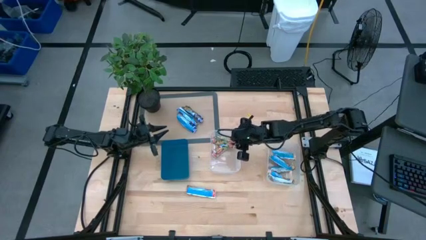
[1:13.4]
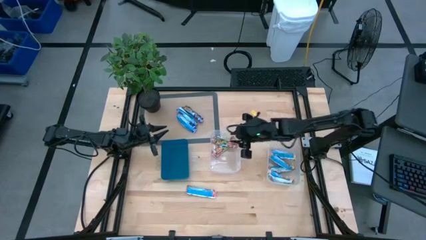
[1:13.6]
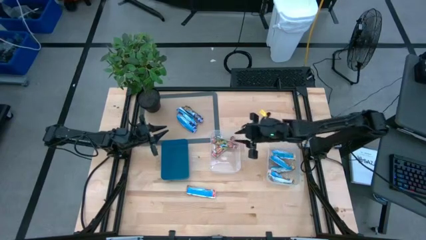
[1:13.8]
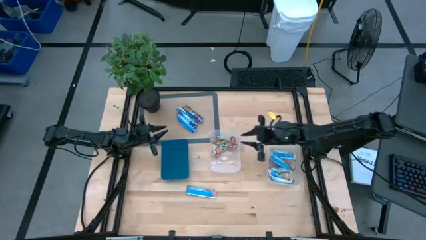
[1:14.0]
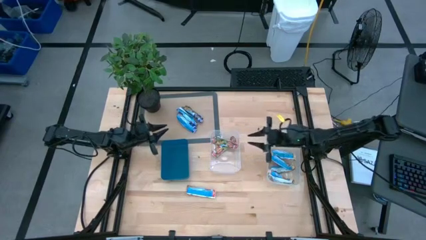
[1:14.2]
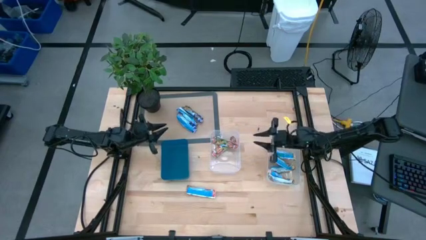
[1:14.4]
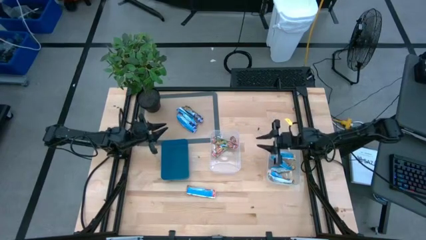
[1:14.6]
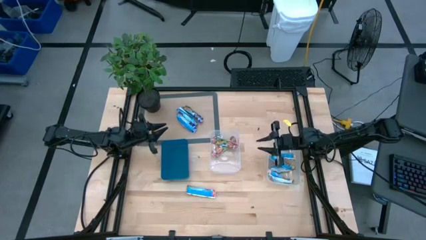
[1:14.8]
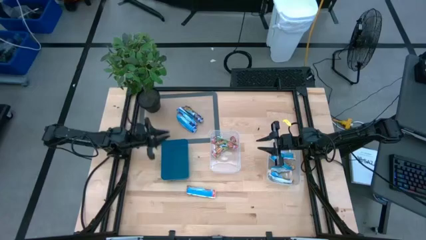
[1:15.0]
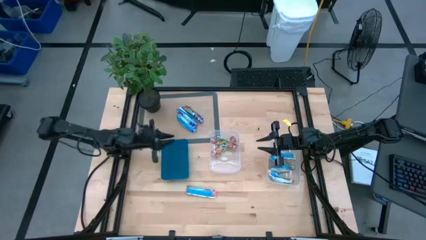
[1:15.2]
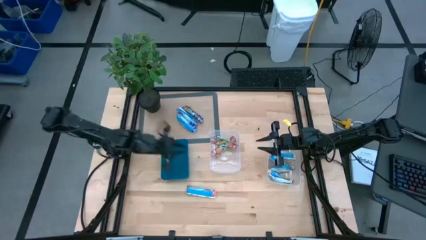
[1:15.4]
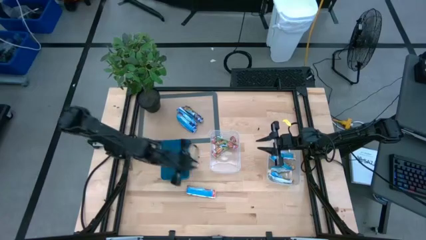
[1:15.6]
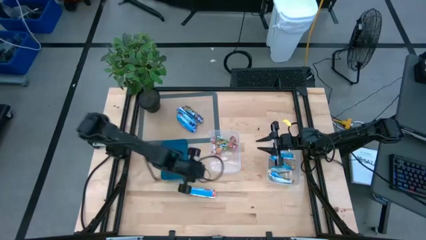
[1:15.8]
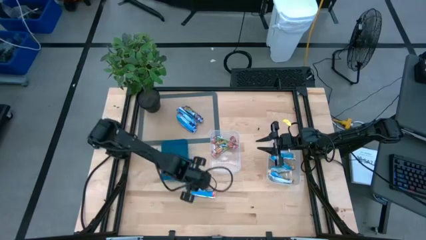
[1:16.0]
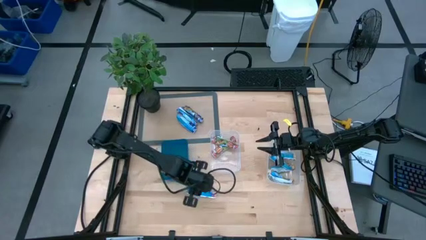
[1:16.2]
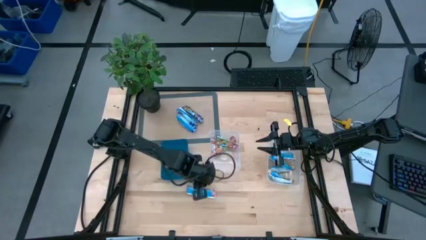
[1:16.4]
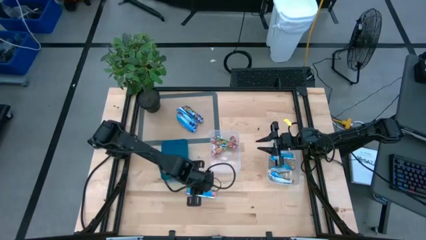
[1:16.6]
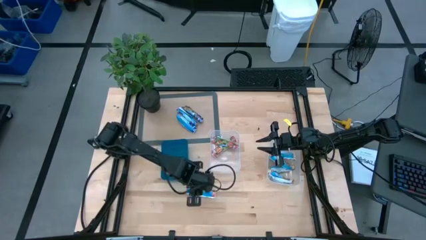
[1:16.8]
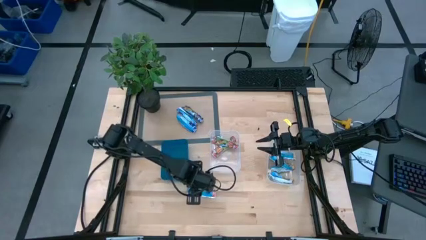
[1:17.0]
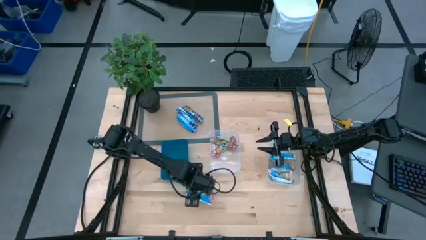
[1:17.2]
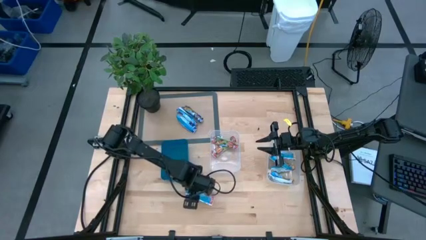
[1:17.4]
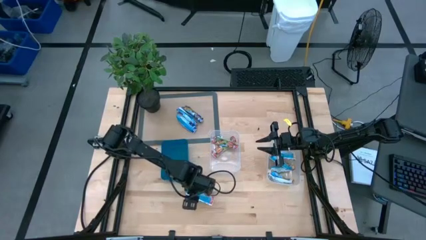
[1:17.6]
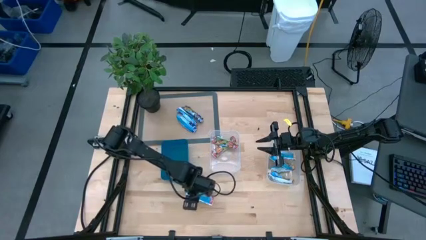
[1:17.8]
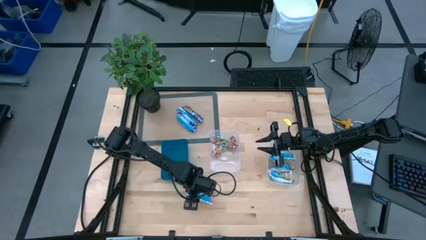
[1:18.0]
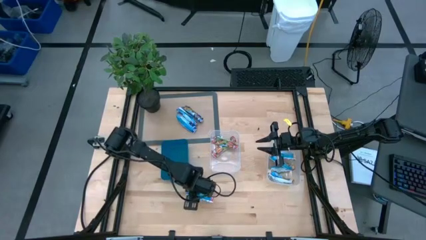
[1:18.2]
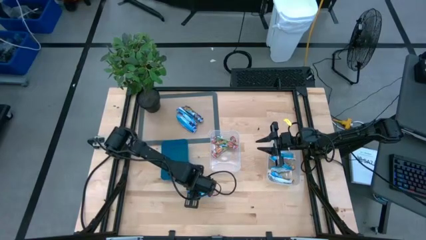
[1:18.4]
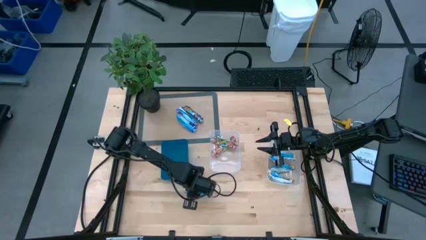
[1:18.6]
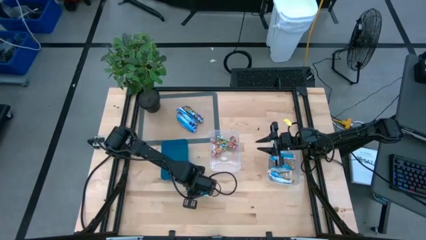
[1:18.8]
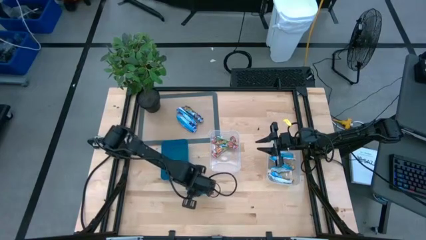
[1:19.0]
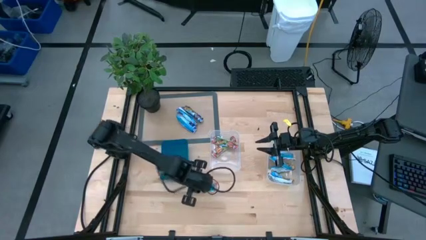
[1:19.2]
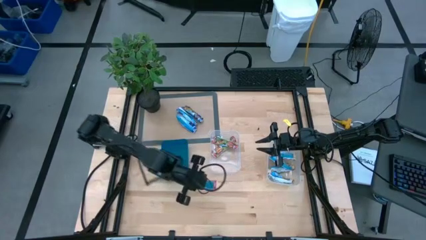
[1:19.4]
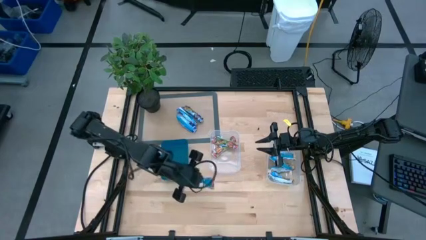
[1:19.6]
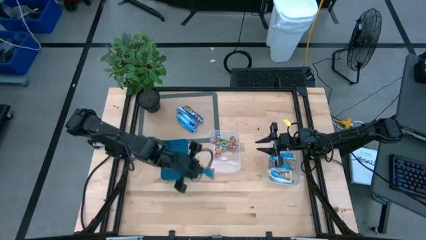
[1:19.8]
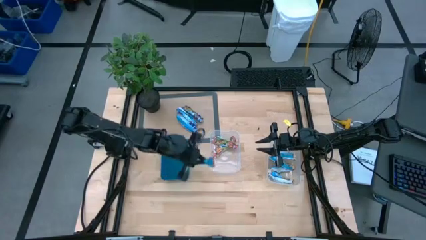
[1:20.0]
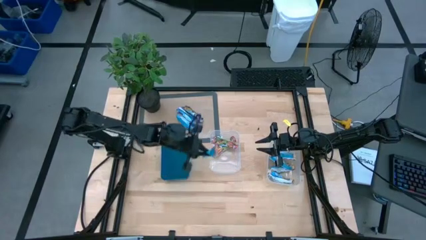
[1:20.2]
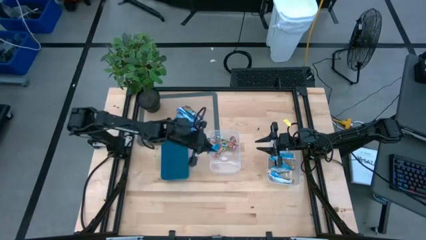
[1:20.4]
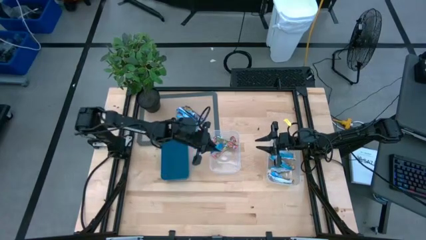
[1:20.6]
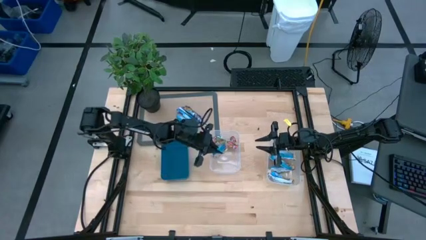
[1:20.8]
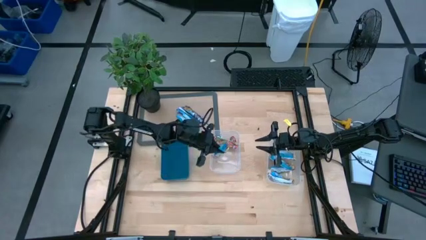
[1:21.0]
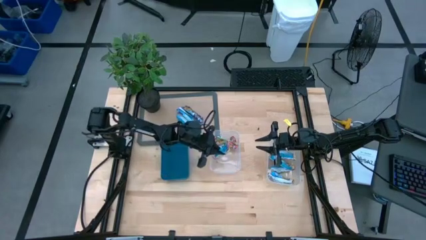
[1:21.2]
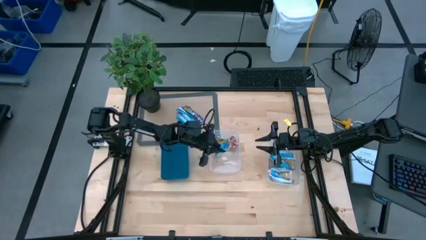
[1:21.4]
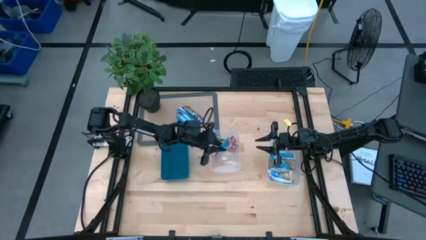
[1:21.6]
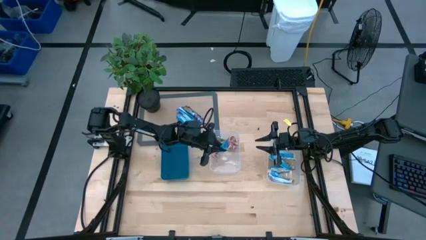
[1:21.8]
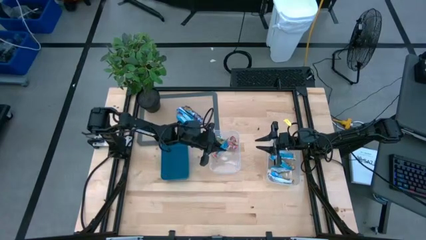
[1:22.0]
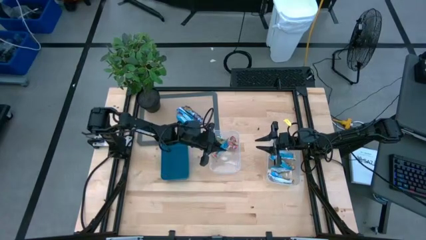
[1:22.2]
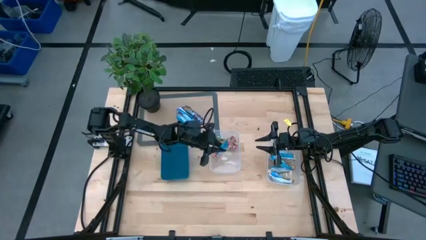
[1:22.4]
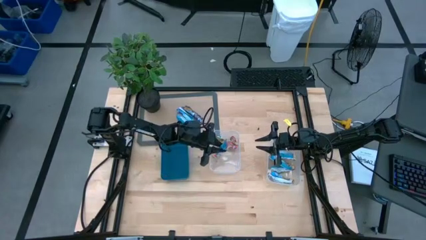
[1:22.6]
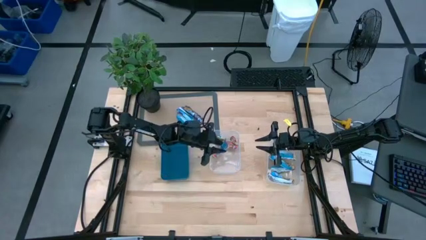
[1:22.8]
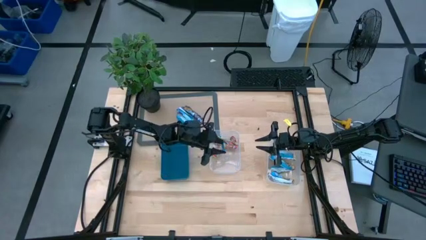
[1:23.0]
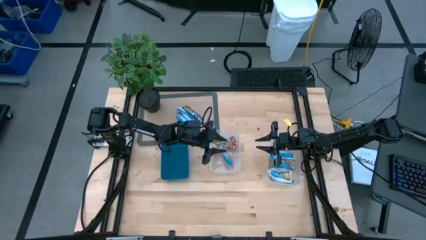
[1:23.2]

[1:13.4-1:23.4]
Task: Pick and place Granola Bars by type
Put the red granola bar into the left transparent bin

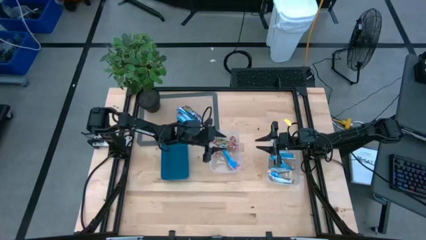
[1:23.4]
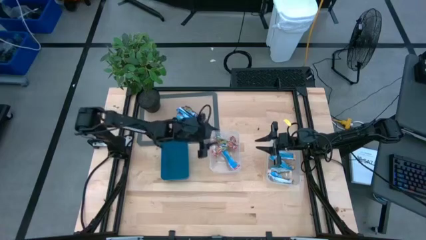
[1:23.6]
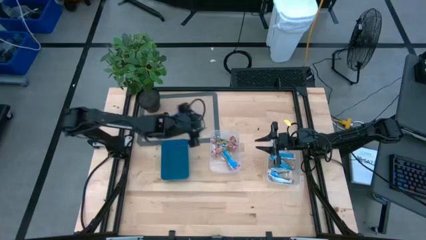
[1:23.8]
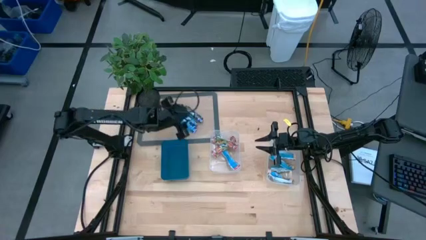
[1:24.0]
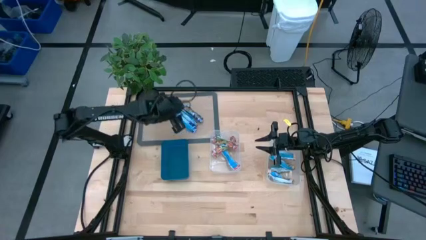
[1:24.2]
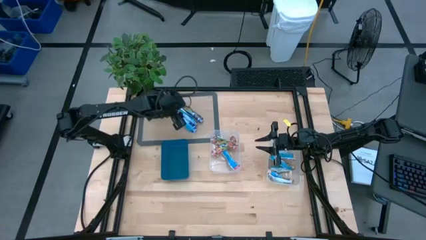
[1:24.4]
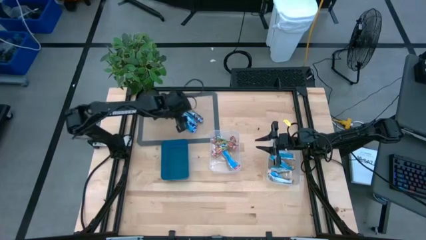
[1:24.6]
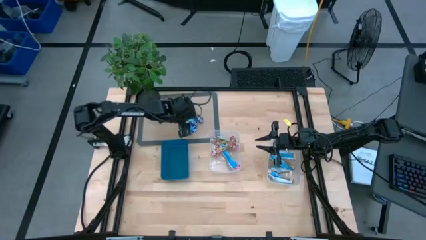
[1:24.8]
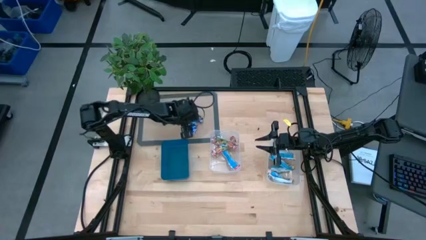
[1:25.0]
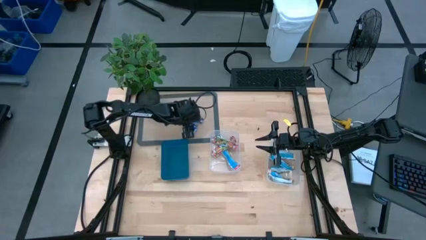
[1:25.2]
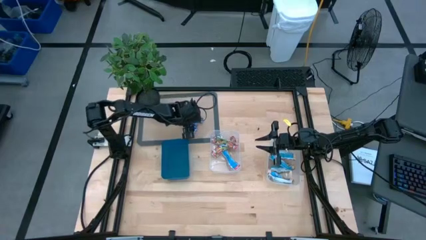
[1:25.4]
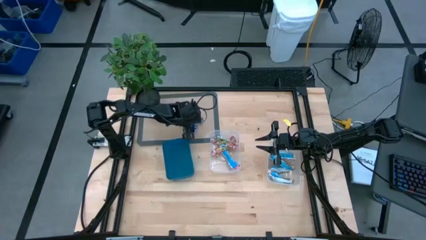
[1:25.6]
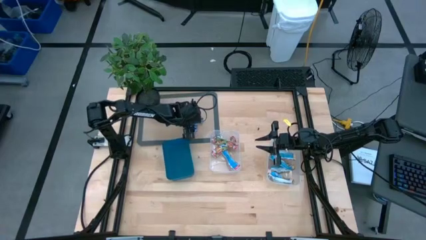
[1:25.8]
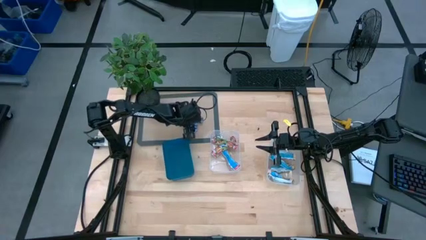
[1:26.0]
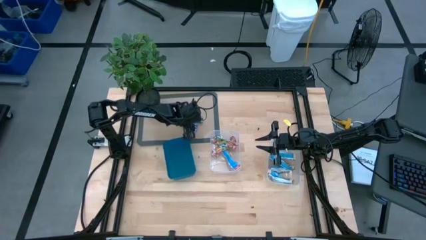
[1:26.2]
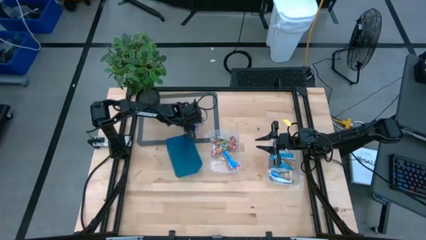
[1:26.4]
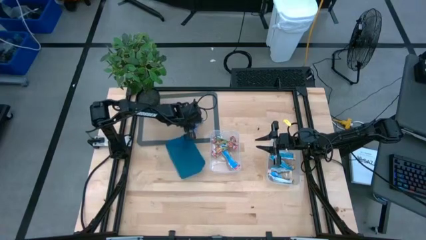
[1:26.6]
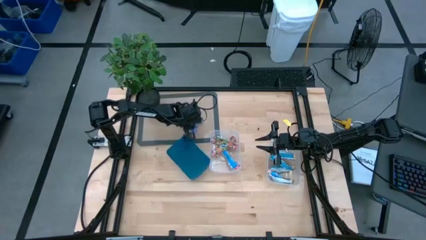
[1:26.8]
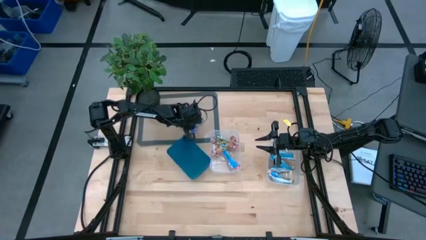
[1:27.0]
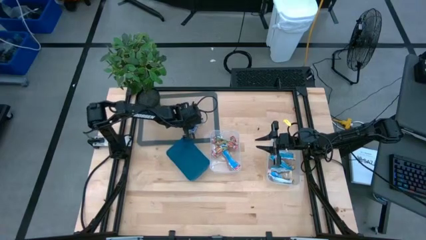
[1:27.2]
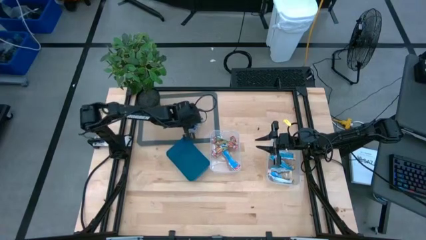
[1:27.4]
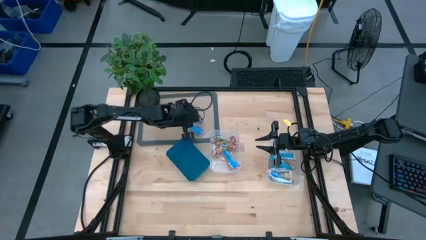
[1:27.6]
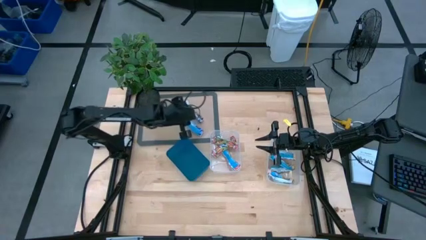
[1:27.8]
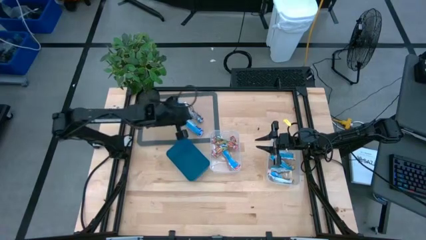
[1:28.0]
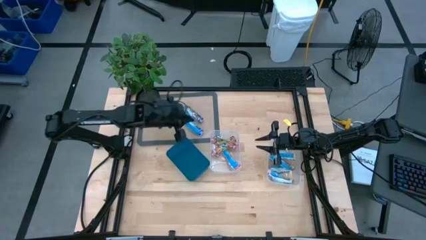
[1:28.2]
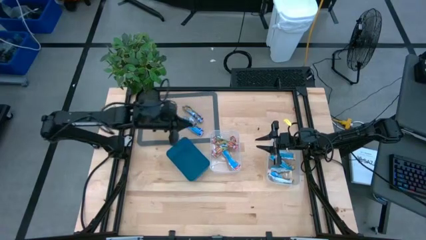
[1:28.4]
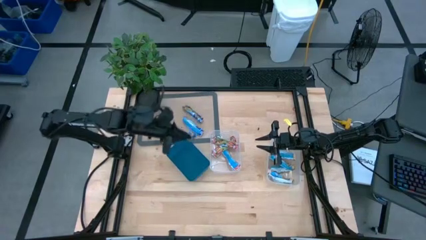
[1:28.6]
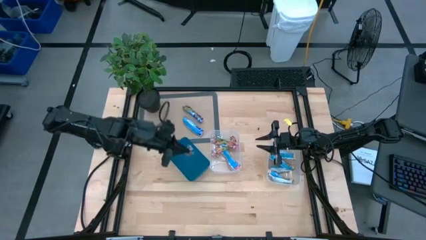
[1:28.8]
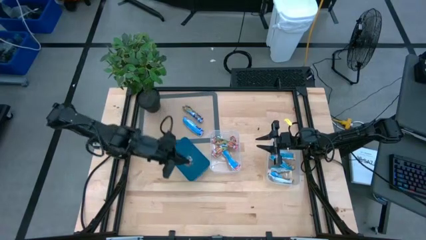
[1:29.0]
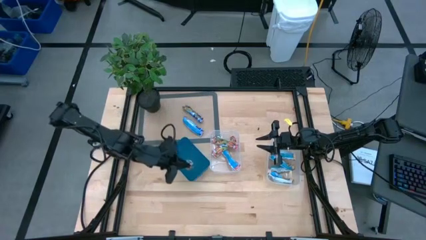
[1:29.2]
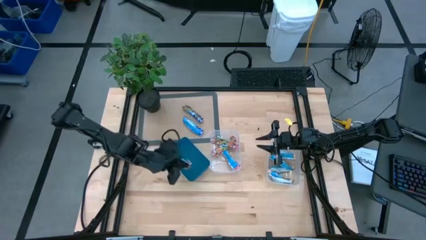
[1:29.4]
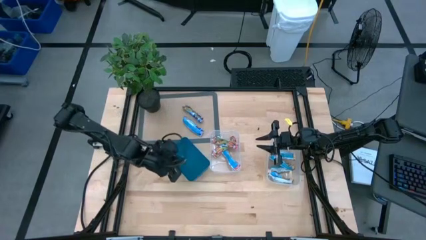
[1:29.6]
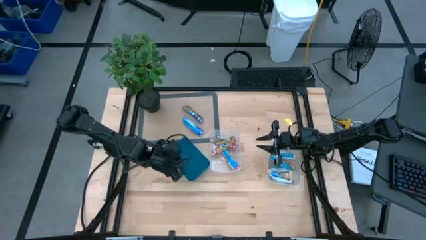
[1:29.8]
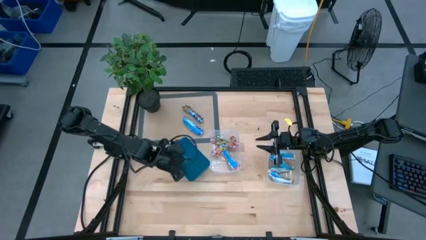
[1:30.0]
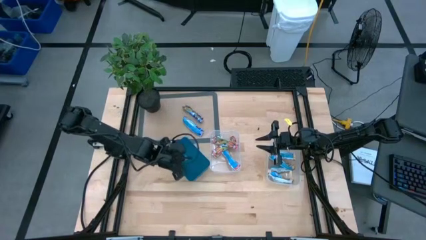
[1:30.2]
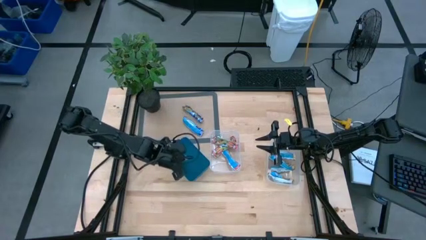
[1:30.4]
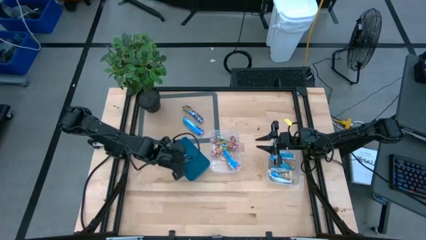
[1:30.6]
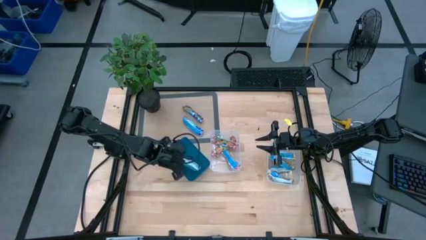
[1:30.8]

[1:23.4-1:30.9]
Put the blue granola bar into the blue bin
